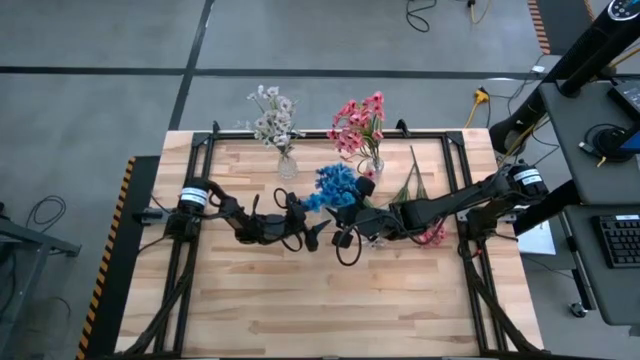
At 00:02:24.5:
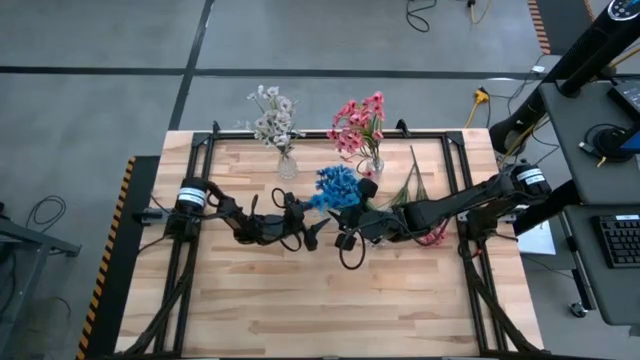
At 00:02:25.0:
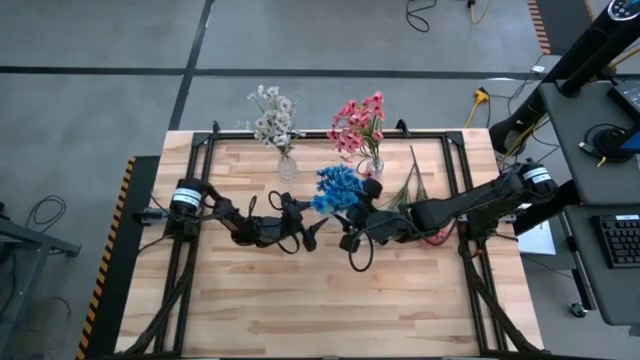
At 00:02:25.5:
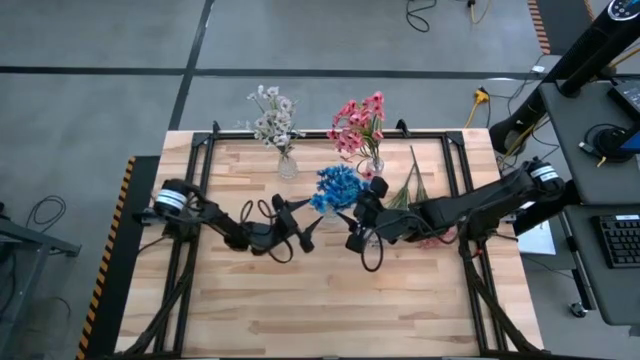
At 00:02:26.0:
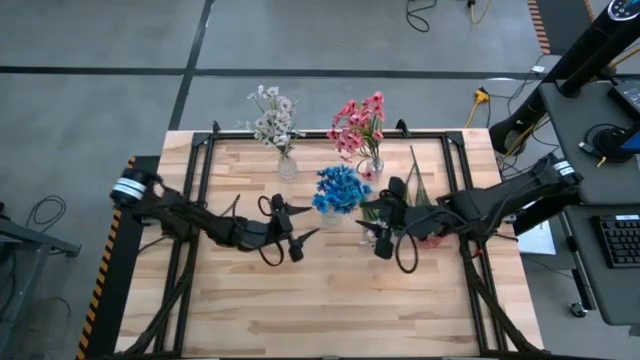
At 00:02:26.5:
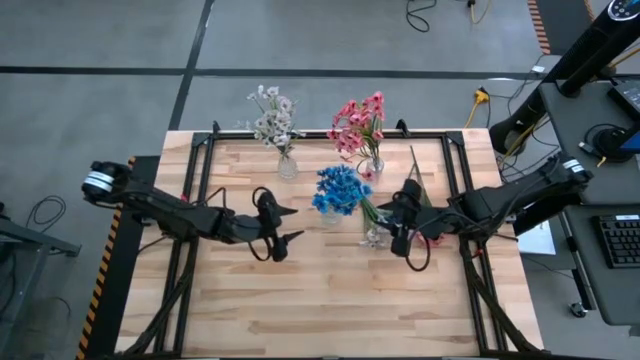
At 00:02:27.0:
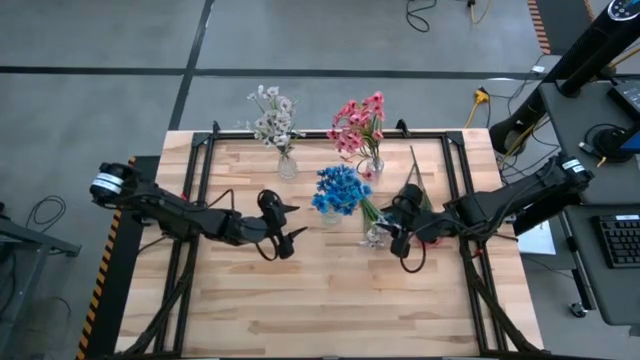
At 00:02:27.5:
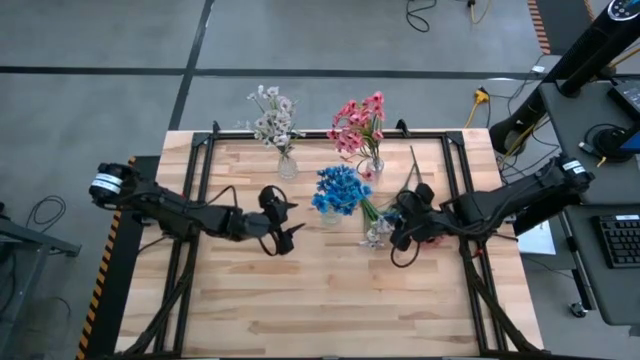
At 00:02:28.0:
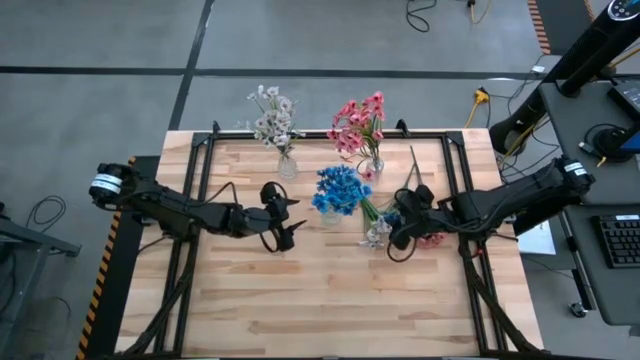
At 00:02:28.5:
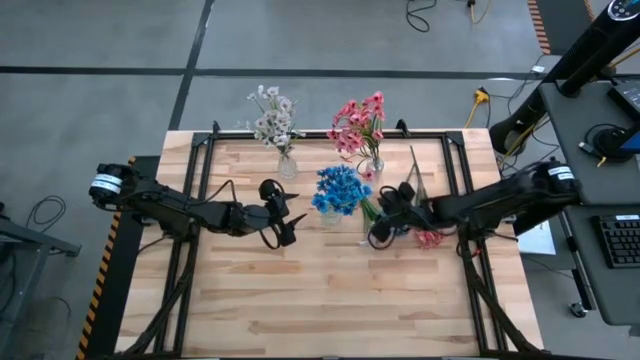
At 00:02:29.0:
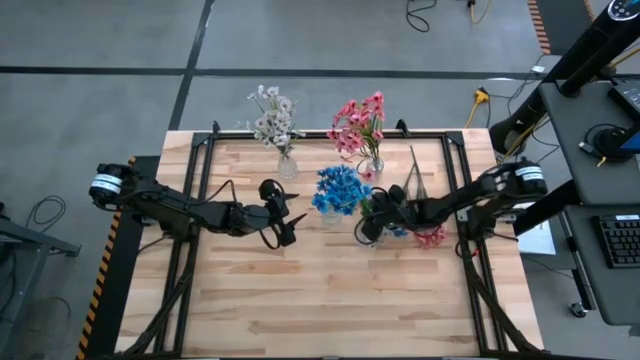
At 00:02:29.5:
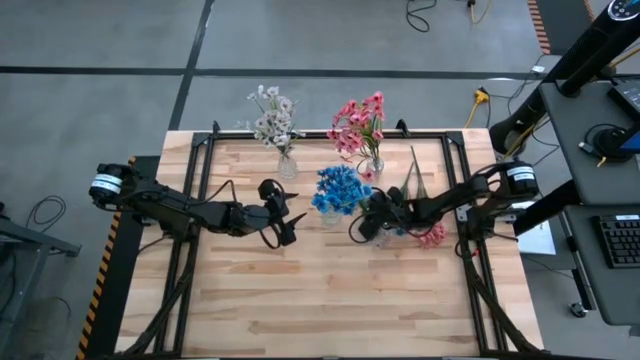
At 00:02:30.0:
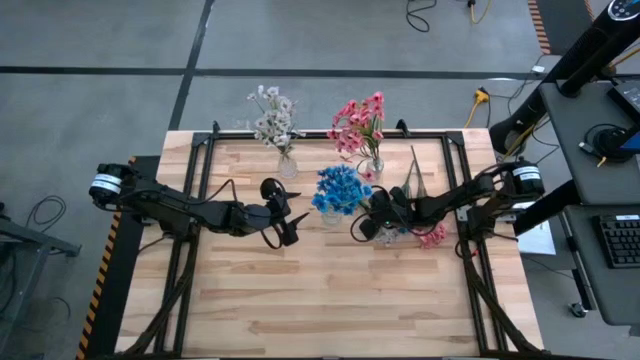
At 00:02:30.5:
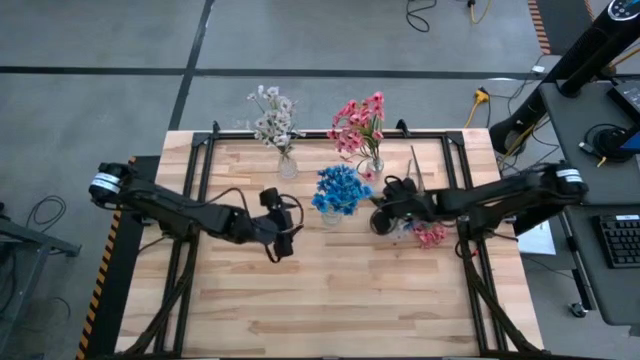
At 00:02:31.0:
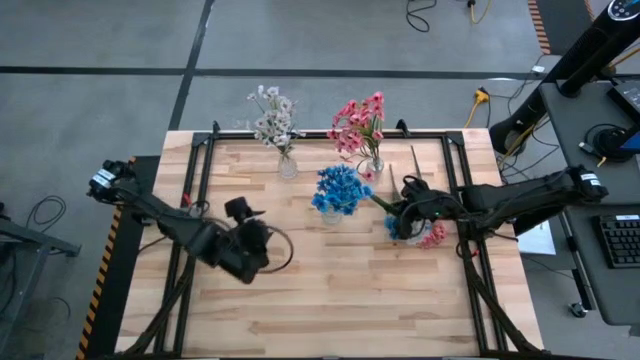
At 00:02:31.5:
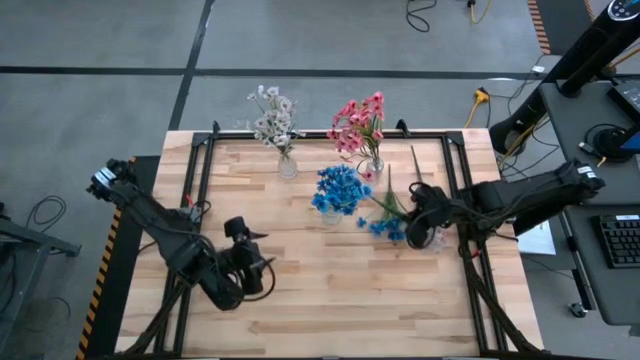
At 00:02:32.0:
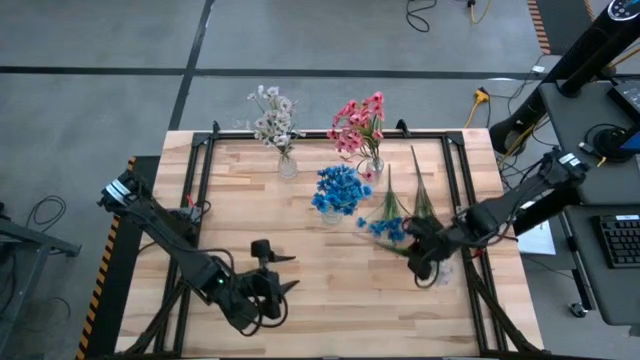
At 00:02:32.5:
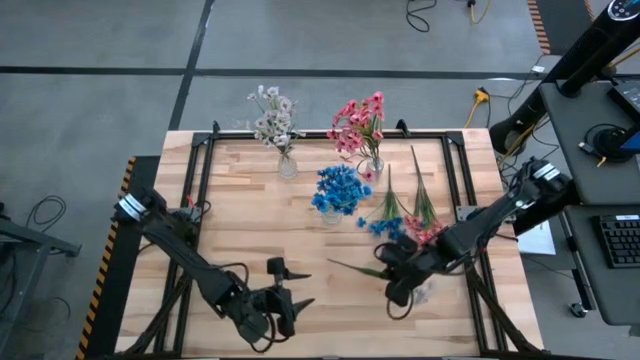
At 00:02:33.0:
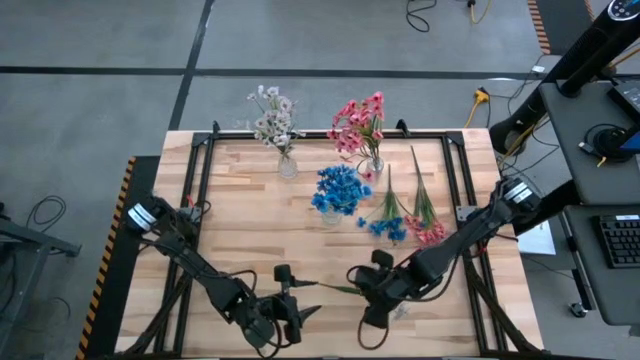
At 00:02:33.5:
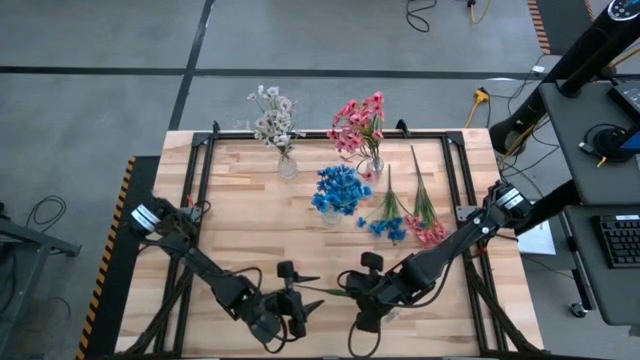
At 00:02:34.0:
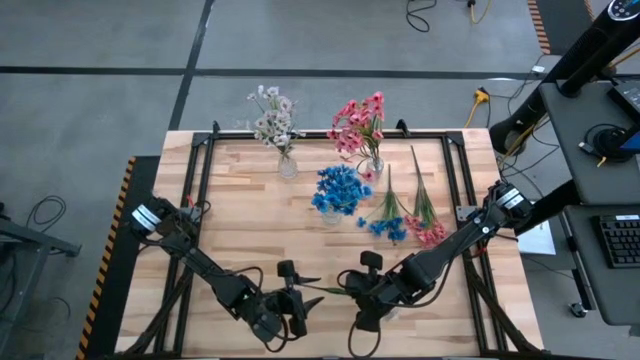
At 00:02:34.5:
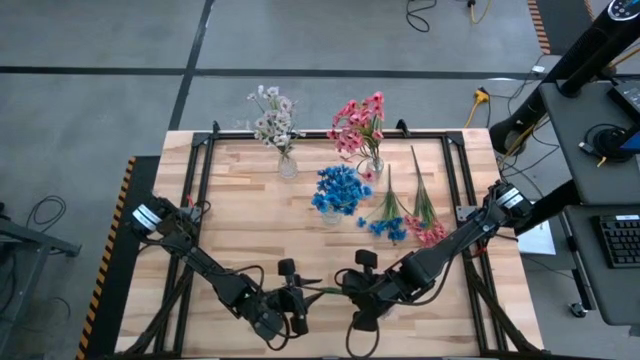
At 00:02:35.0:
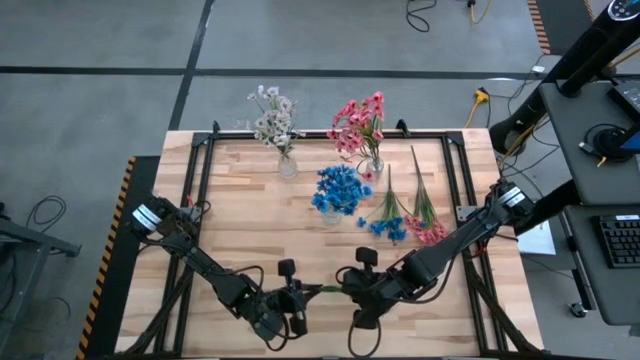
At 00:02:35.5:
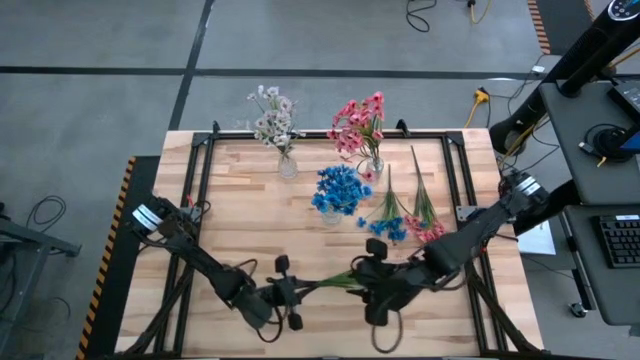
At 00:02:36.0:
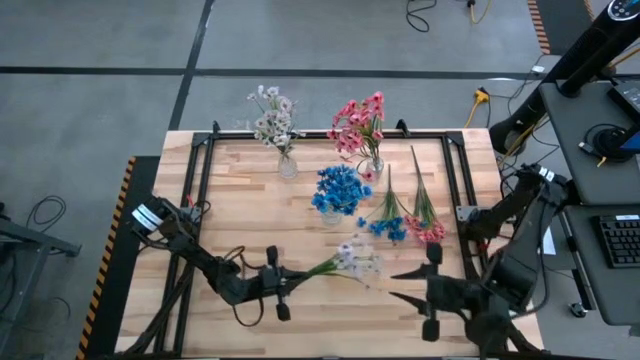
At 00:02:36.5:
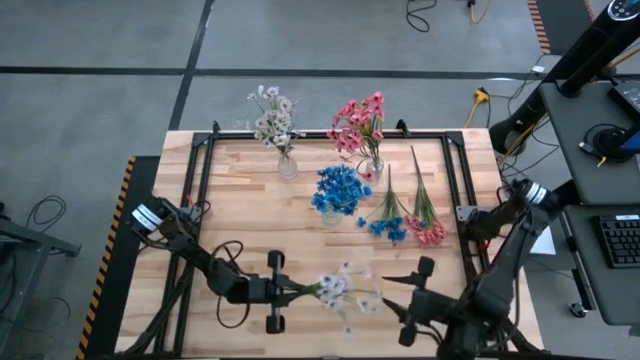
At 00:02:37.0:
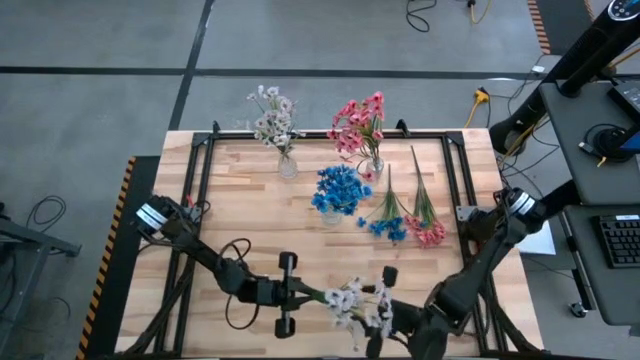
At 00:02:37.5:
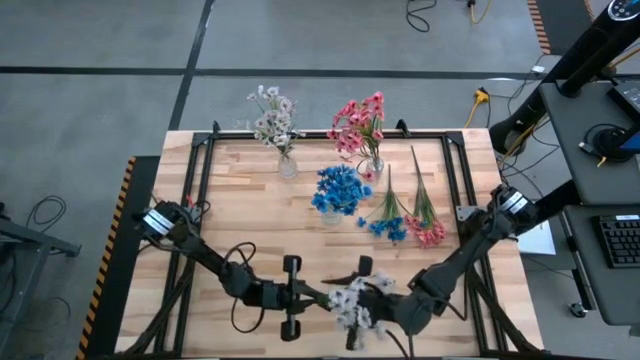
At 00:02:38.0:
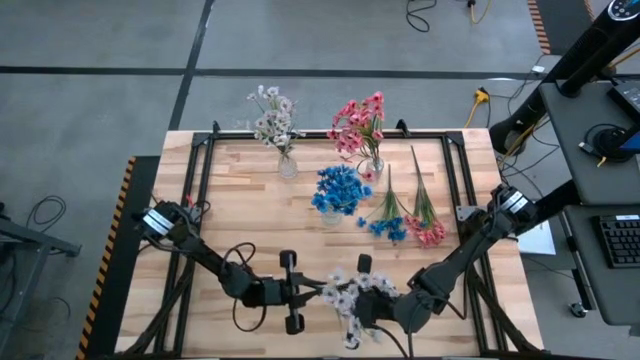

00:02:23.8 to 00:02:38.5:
Task: Sort flowers into vase by color
Put the white flowers into the left transparent vase

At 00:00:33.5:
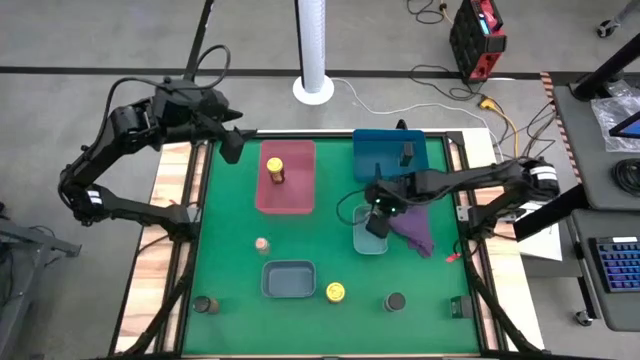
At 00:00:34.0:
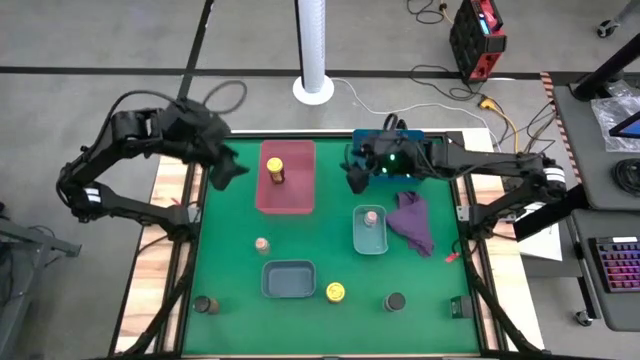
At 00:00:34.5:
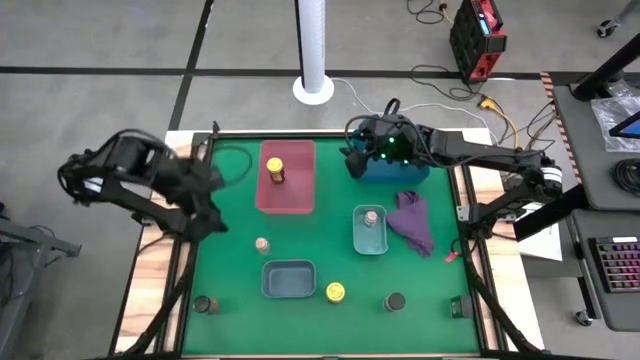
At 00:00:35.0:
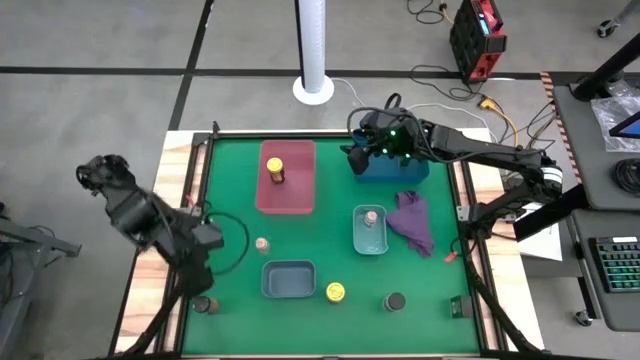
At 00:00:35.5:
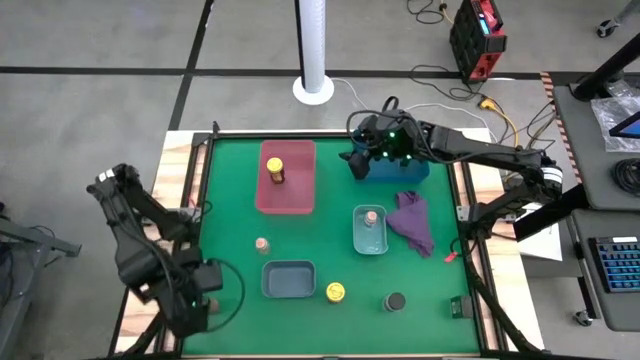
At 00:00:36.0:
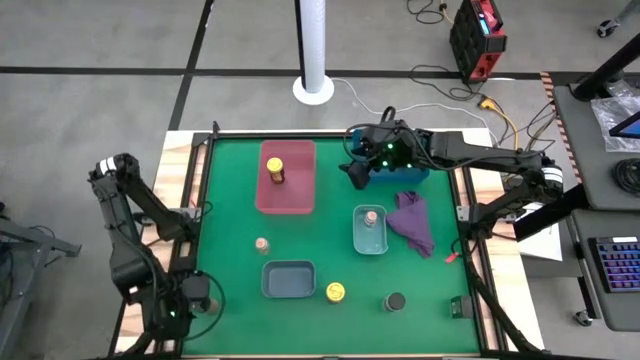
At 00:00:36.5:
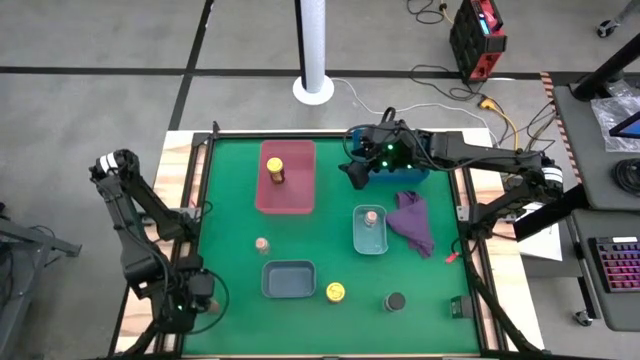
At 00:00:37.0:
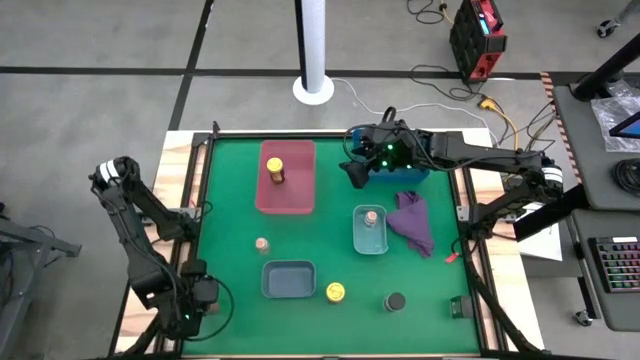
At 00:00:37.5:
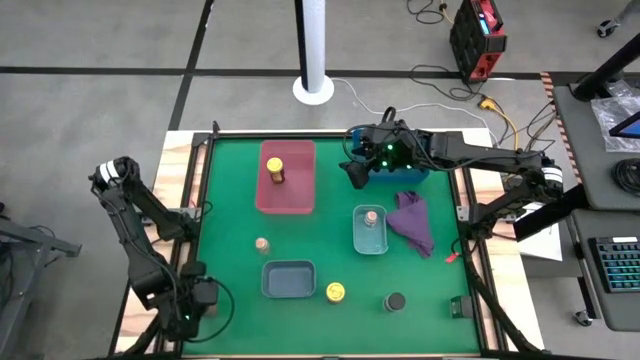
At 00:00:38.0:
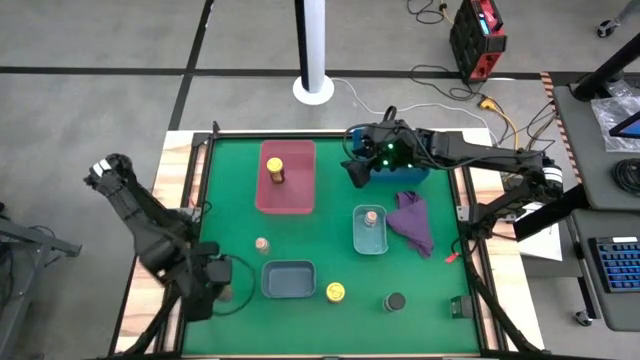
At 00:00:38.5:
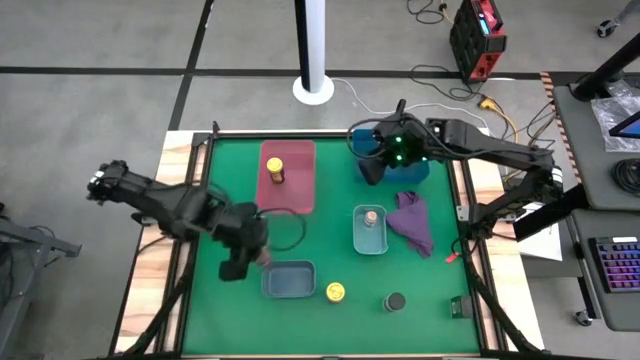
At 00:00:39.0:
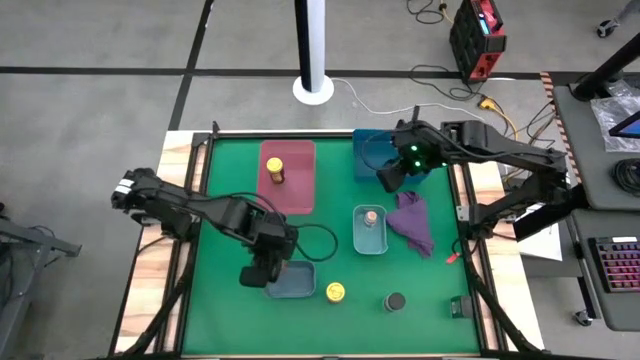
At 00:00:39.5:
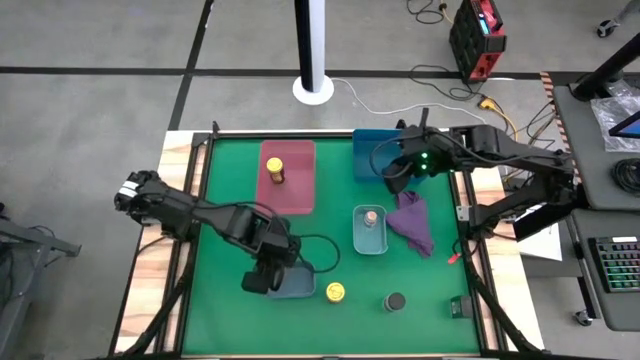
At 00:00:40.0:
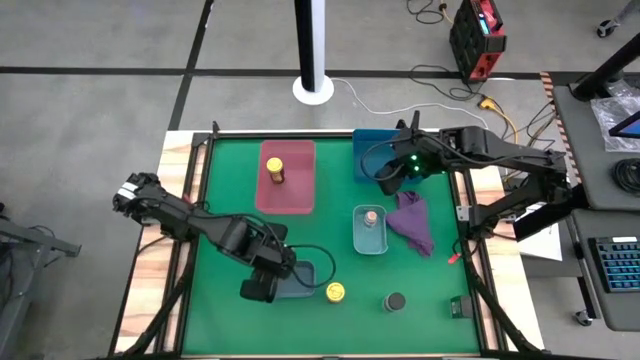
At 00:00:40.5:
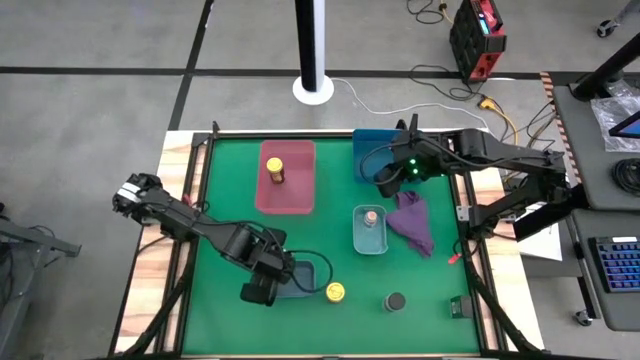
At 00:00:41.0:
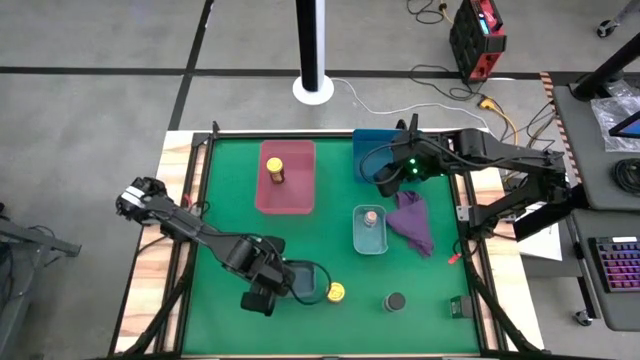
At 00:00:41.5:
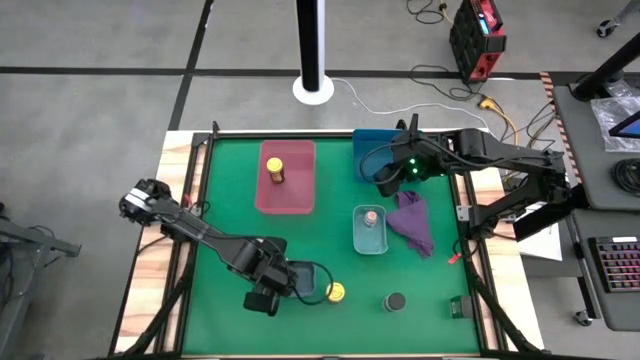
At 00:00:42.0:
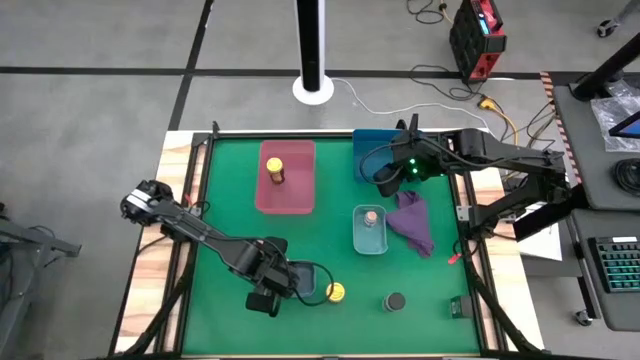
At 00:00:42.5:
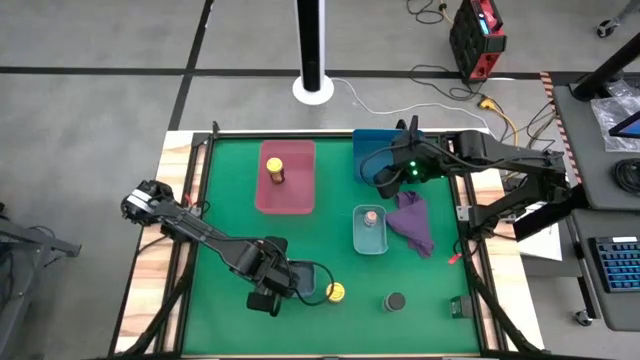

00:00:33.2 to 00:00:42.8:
Task: Sort spices by type
Put the left black seasoning bottle into the small blue bin
